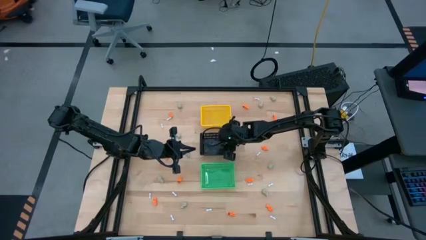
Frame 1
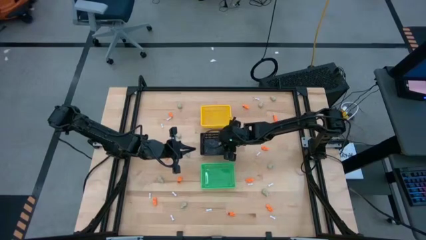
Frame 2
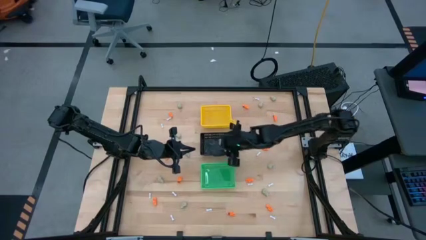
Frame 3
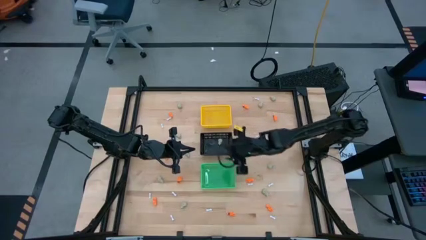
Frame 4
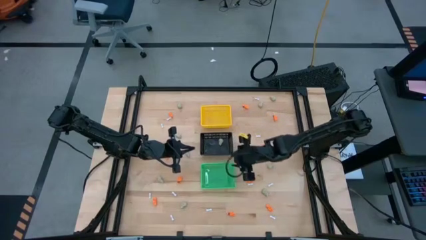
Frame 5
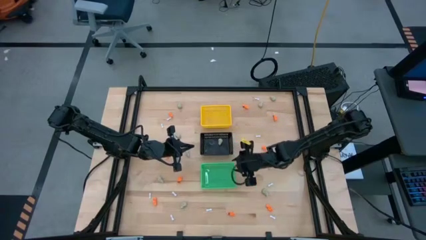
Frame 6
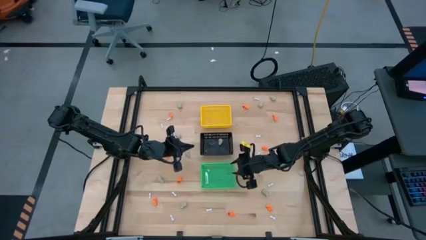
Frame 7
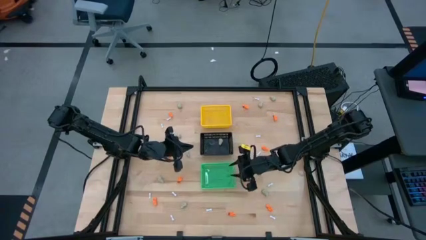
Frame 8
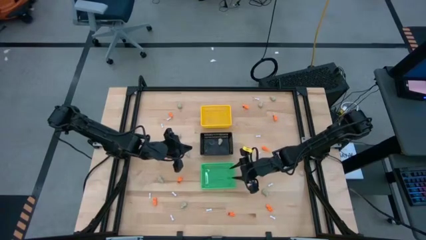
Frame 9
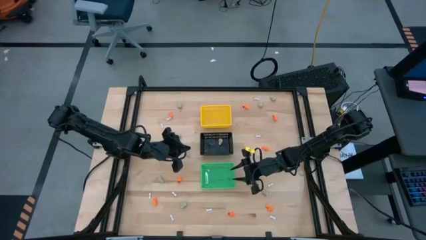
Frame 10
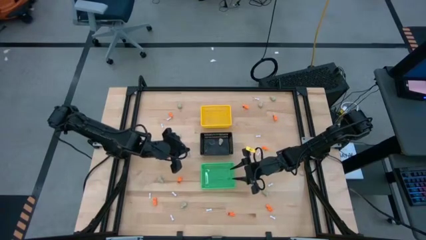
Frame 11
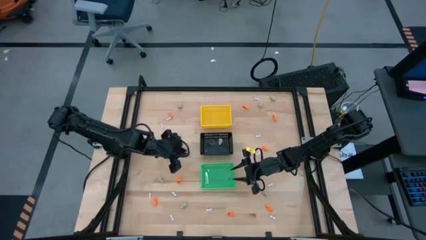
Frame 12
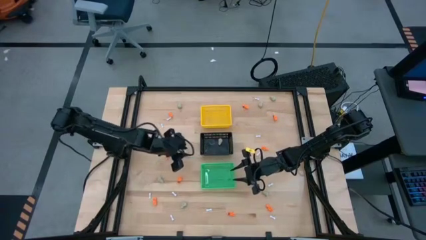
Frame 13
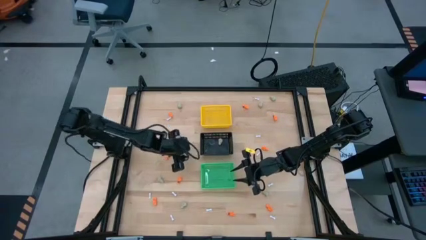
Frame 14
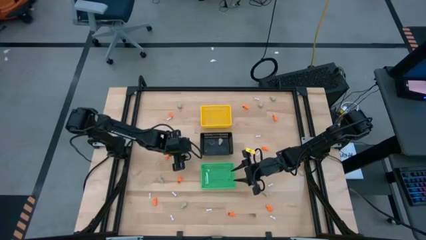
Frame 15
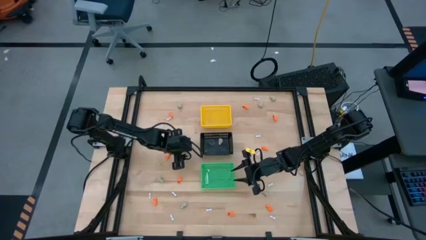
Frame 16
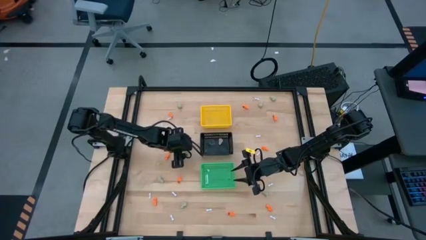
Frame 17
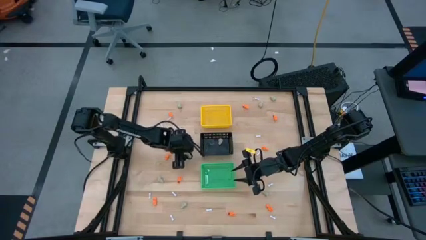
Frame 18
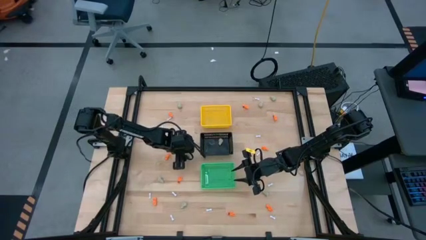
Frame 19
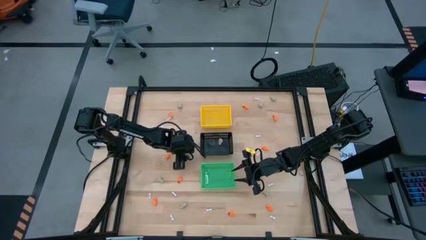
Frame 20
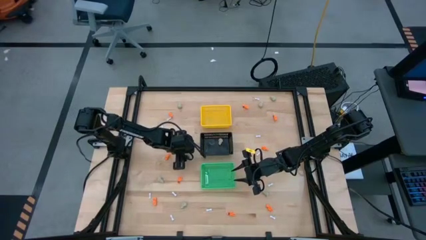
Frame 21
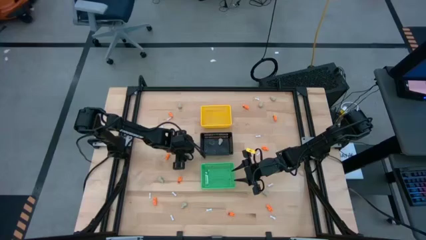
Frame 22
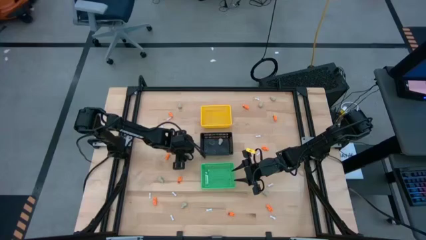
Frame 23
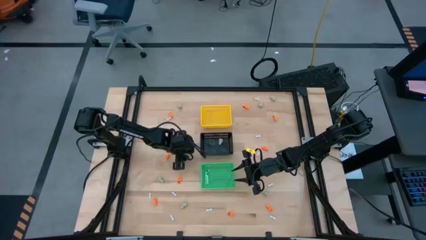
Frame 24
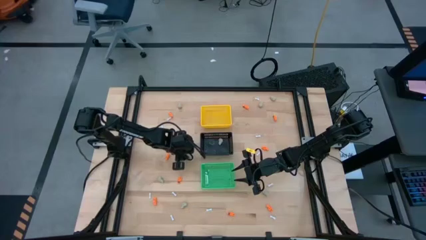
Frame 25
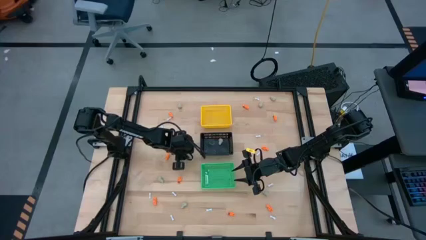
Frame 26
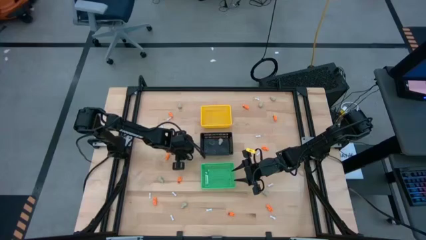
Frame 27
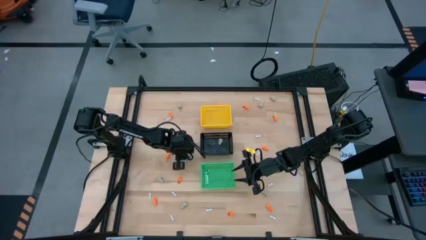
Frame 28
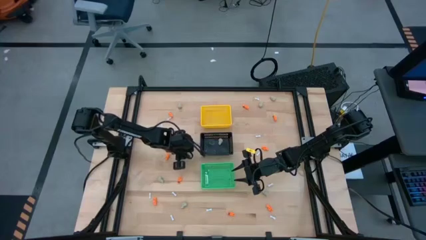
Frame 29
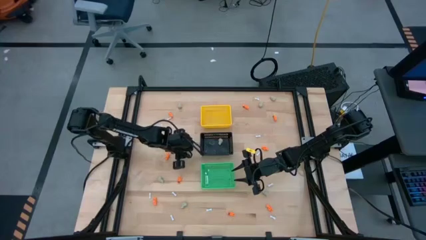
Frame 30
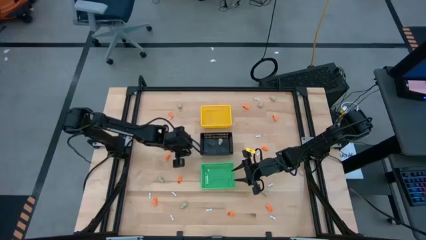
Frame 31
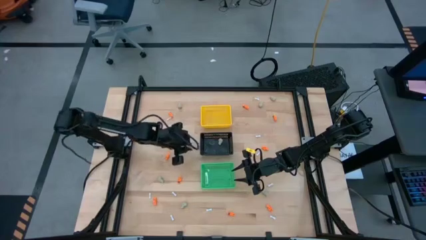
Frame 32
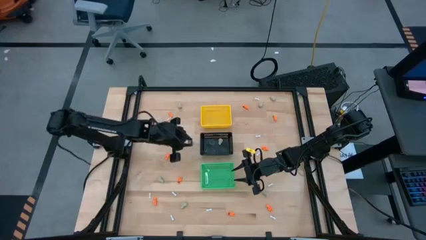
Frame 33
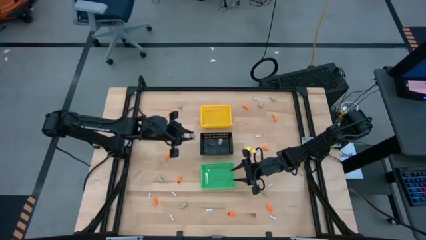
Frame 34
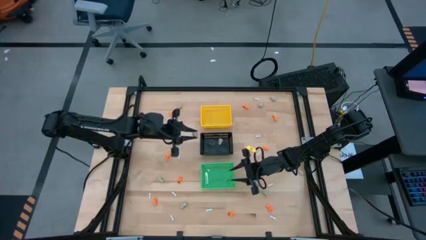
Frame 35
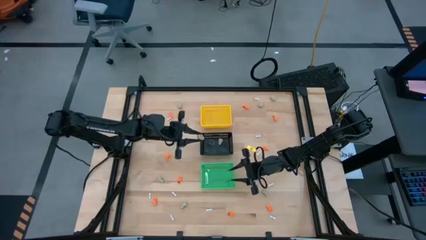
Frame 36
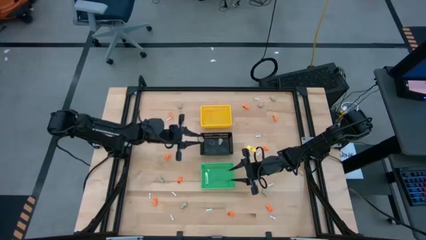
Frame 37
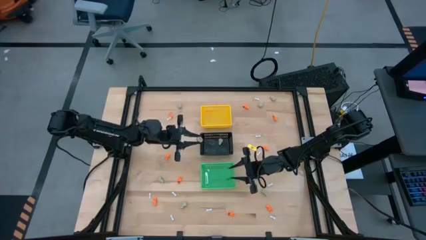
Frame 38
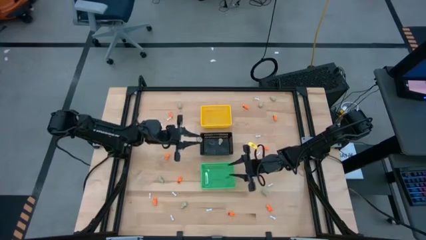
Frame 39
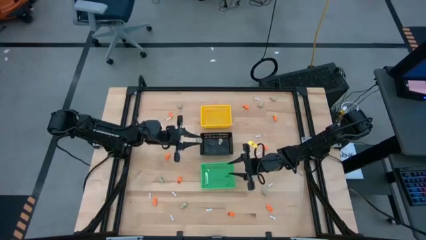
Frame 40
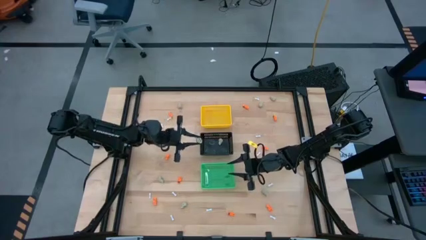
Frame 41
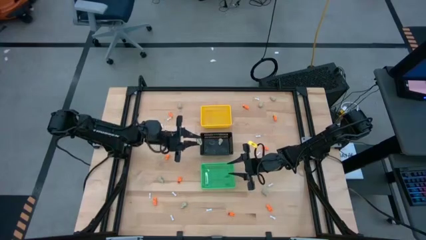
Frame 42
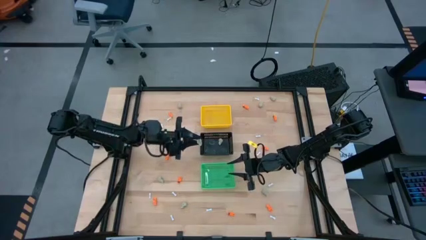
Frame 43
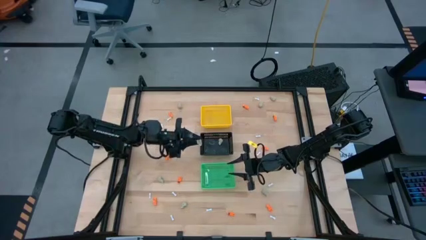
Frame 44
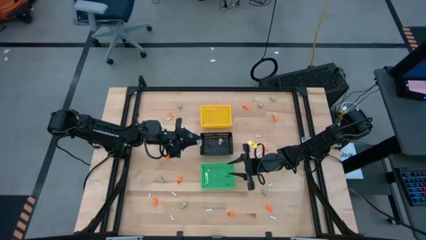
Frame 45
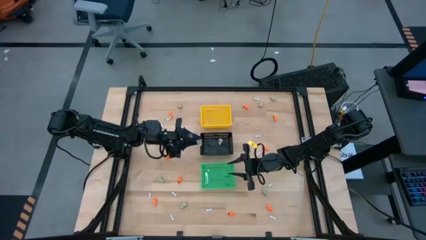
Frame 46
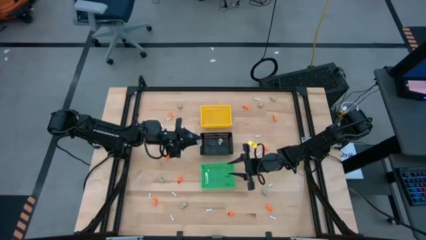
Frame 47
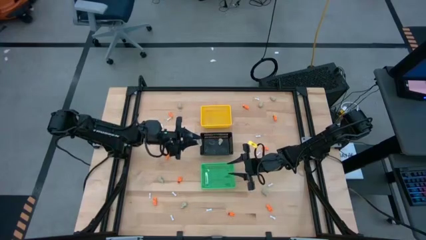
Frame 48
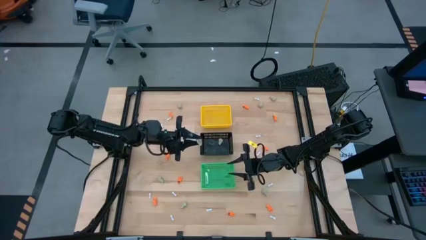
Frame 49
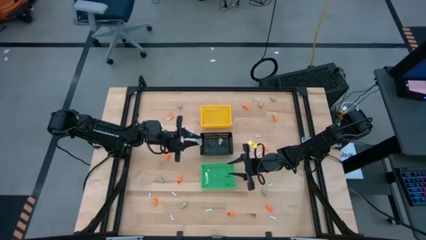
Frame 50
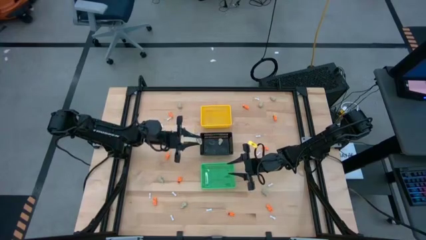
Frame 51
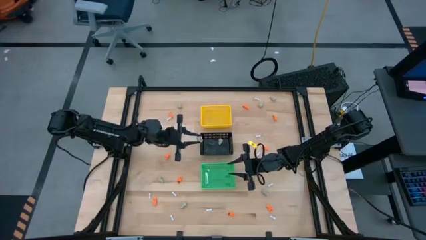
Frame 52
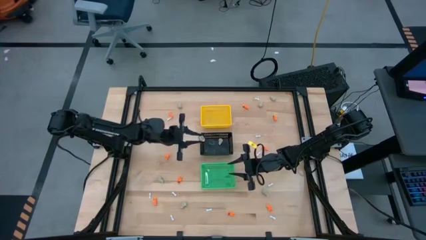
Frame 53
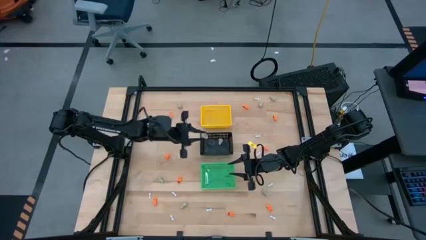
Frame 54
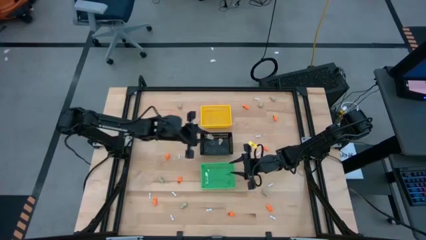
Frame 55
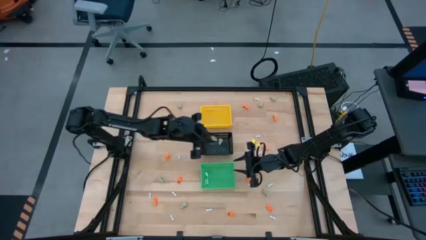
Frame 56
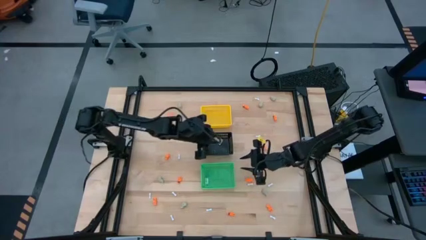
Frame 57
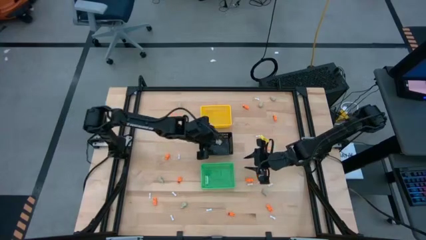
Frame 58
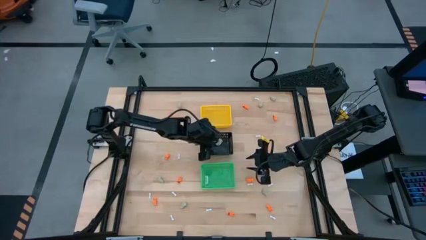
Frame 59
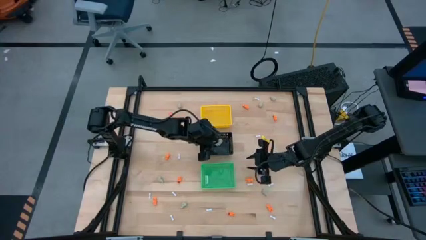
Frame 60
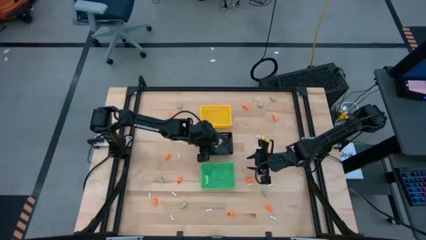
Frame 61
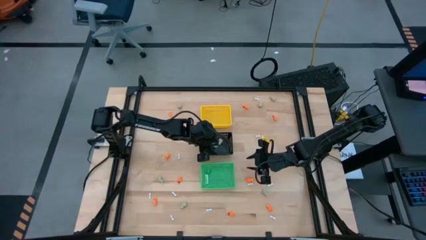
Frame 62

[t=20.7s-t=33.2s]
Task: Sort Halloween decoration
Put the gray skull toy into the black basket
